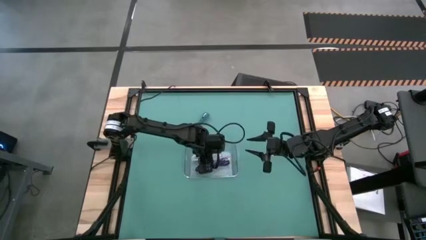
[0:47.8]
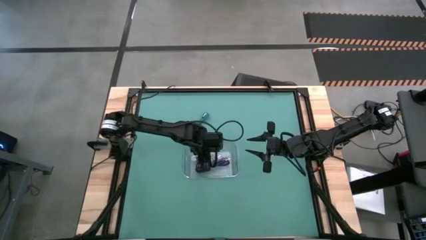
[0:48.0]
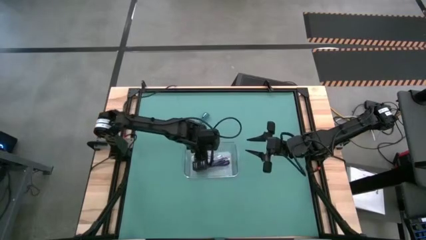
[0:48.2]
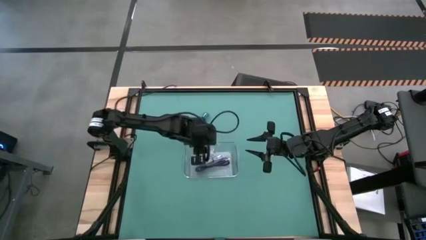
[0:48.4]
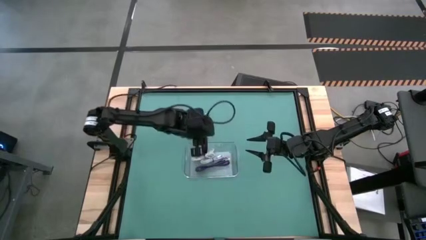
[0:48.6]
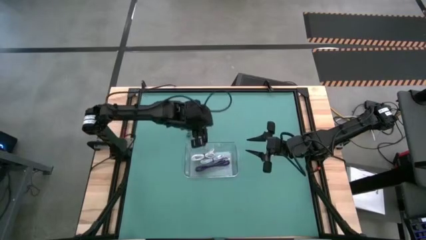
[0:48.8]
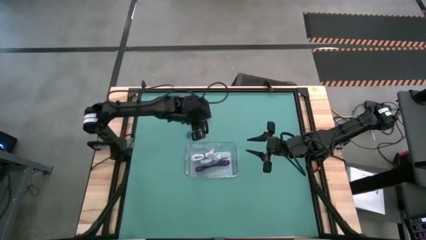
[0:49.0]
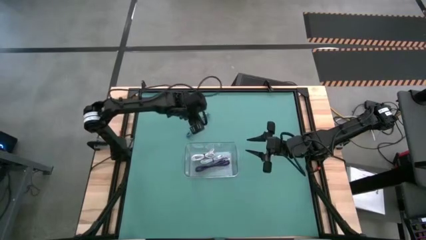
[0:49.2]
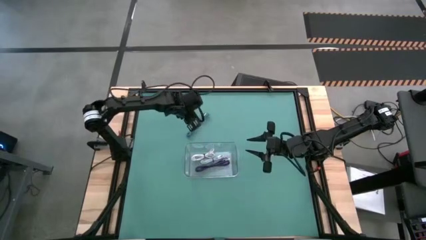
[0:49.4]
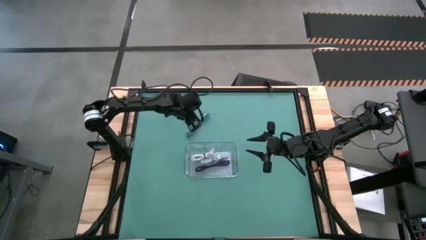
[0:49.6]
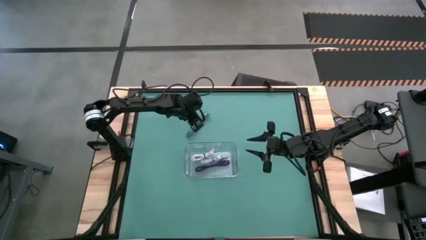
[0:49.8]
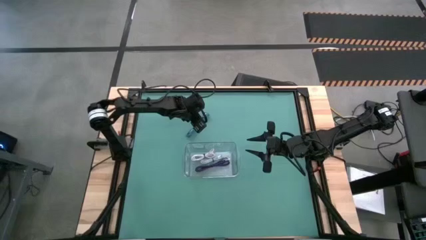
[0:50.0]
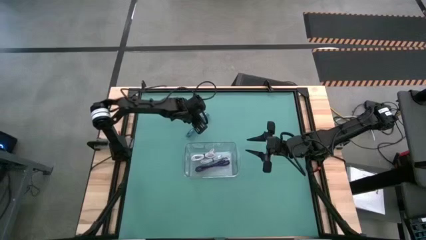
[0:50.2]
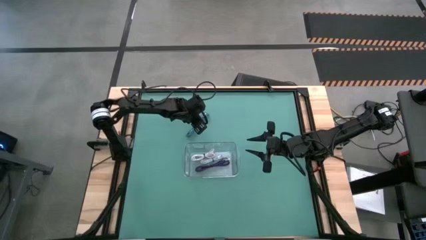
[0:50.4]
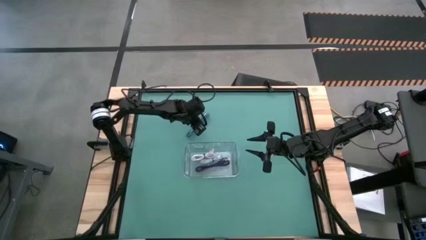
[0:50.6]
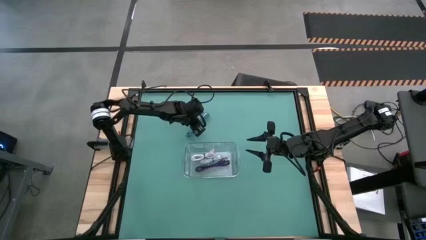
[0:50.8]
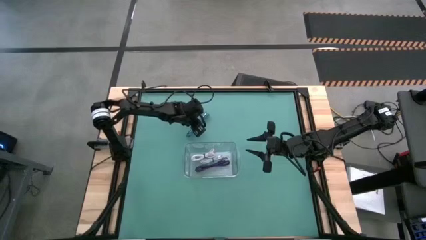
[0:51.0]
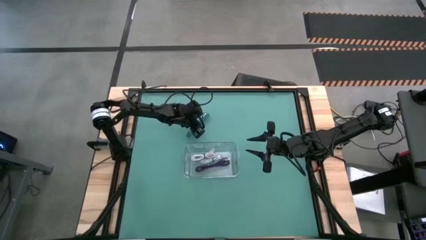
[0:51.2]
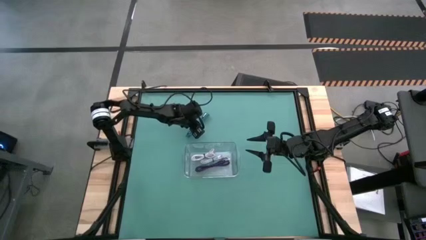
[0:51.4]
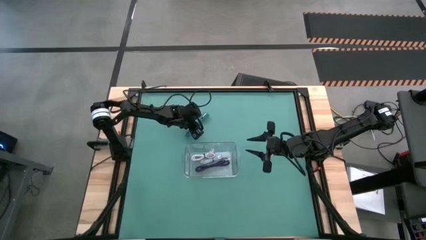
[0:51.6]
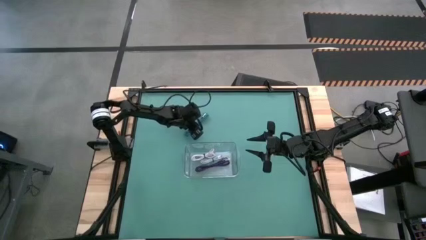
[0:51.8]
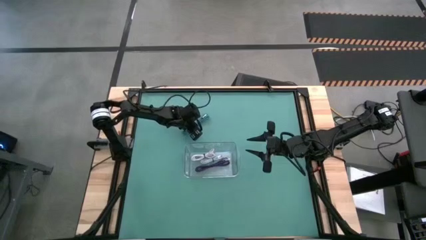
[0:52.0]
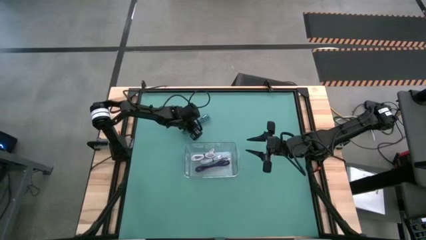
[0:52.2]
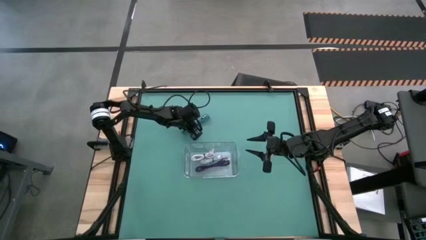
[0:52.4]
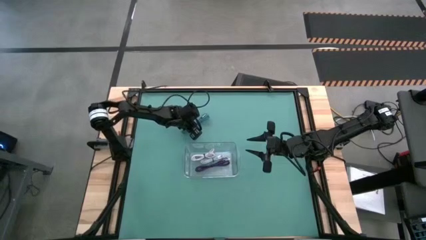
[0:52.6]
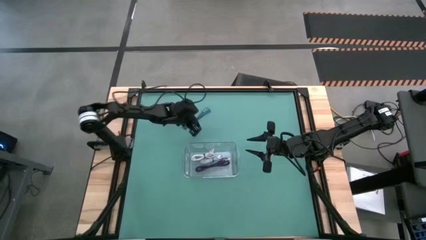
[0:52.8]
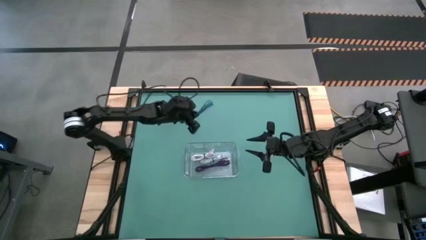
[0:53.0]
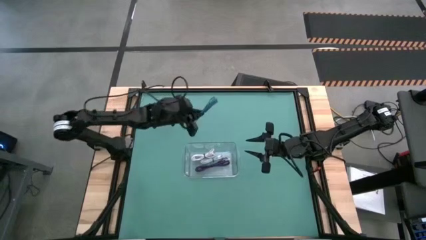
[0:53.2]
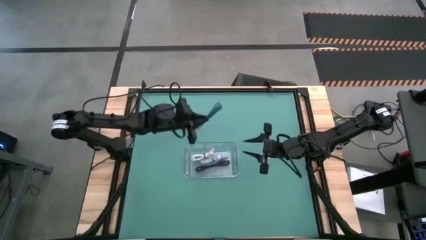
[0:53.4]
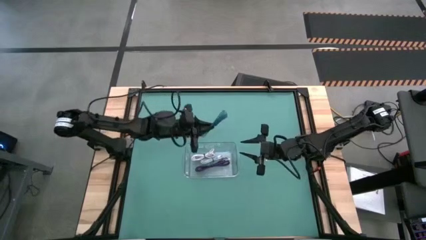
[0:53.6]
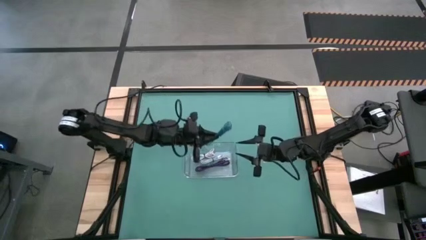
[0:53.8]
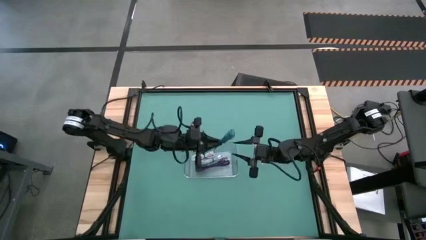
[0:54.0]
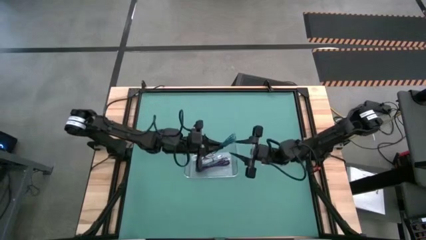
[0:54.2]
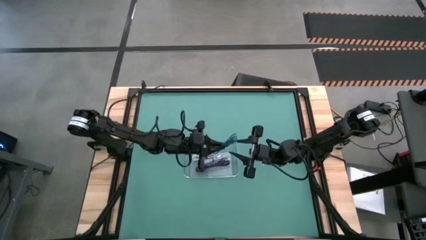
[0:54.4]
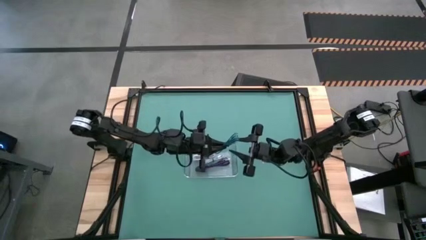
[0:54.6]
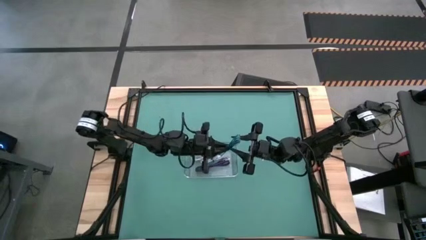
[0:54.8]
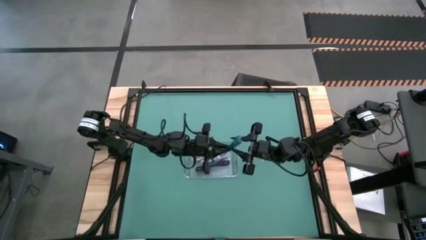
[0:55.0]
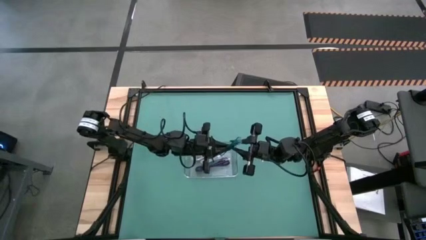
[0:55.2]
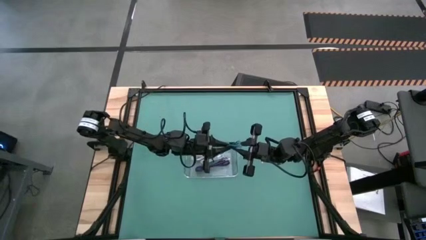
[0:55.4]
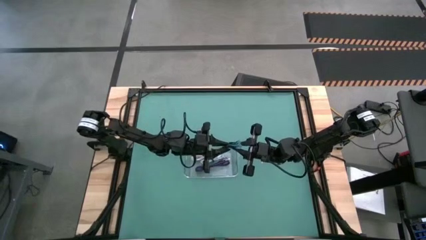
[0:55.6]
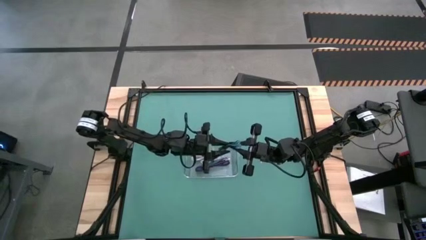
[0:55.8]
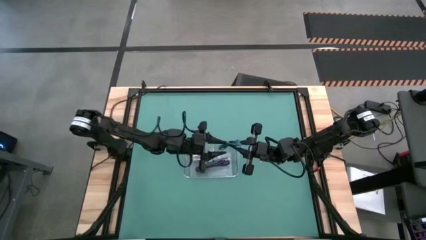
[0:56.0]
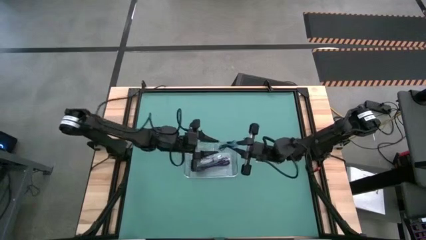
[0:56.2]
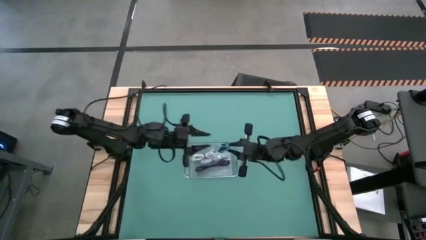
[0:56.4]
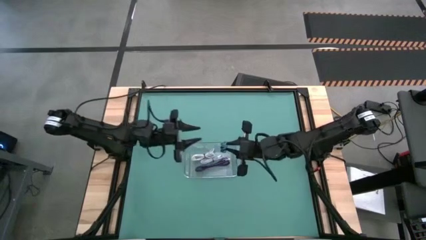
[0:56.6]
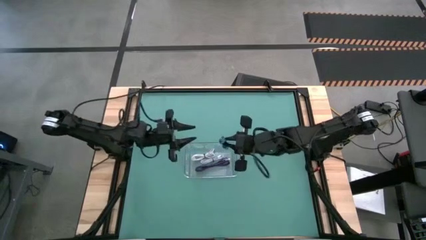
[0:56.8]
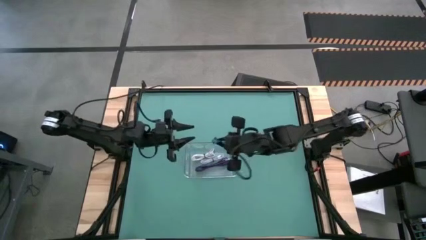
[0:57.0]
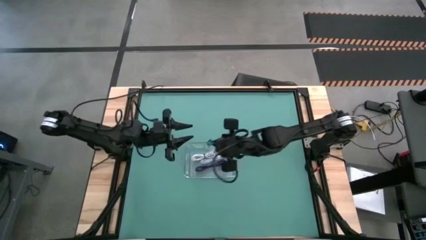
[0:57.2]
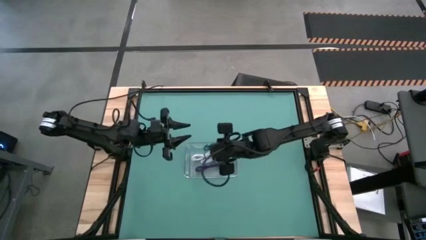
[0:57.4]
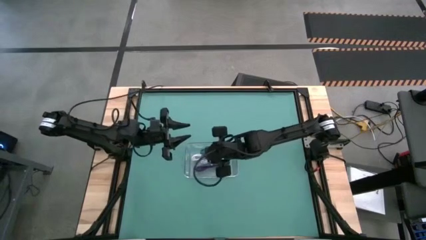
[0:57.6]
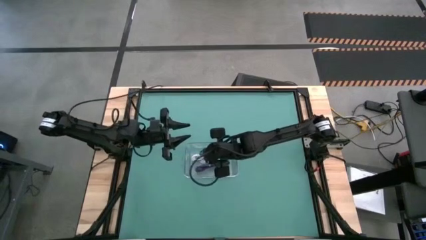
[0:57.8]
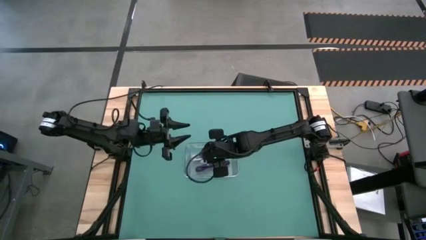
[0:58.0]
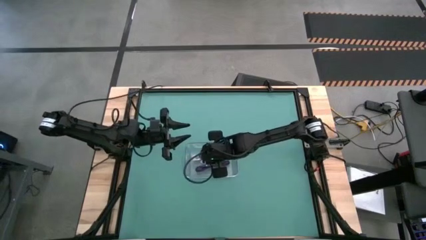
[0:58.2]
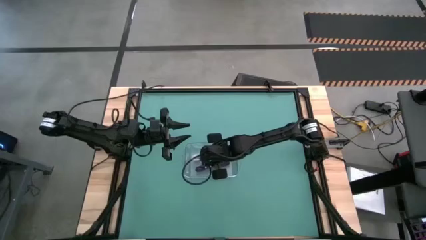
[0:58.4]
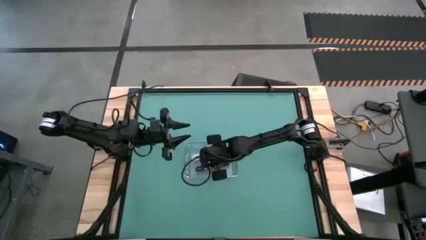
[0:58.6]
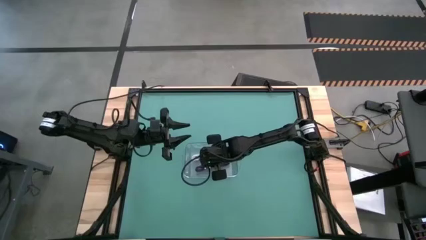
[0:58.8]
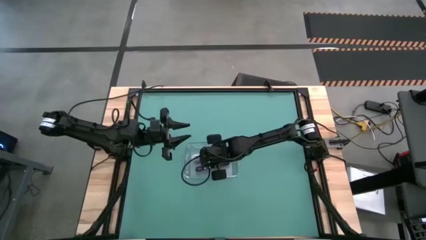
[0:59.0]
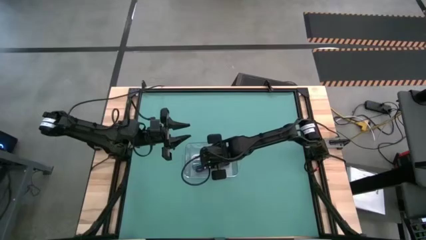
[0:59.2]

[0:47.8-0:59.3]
Task: Pick and place USB-C Cables
Put the blue charger cable into the transparent bin
